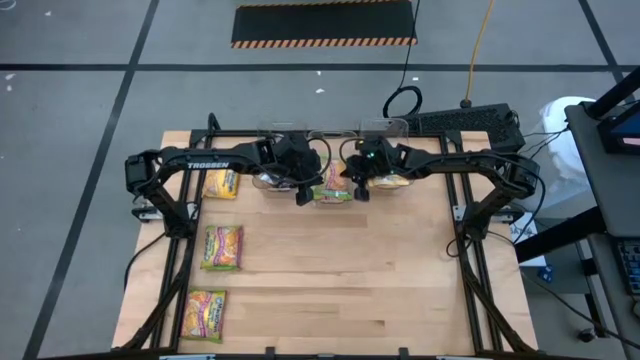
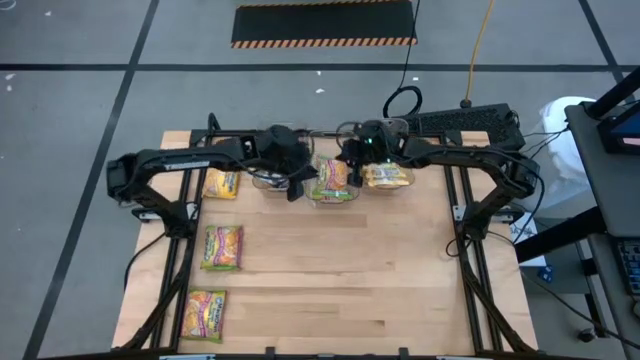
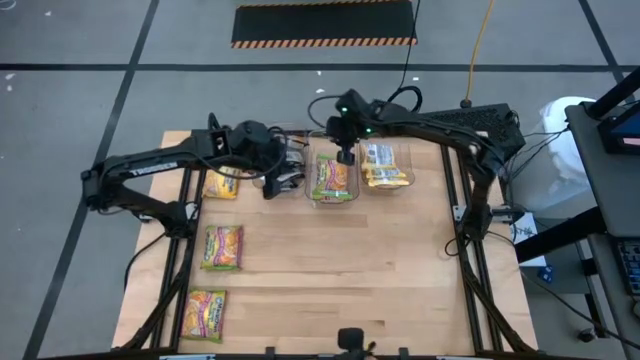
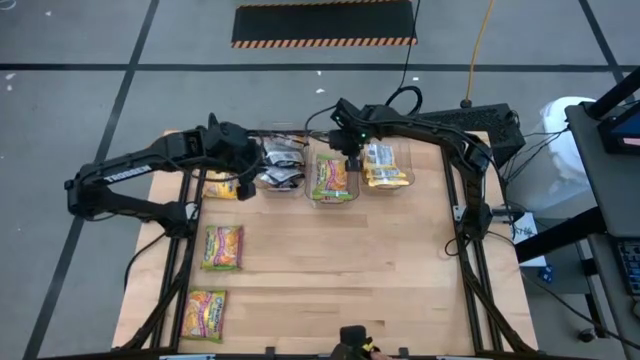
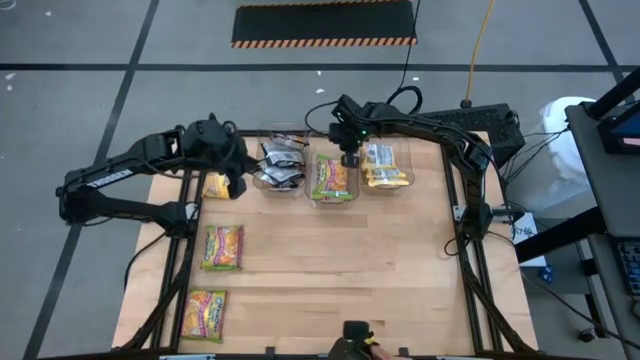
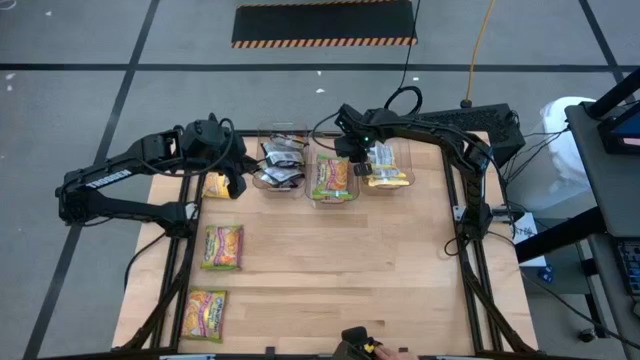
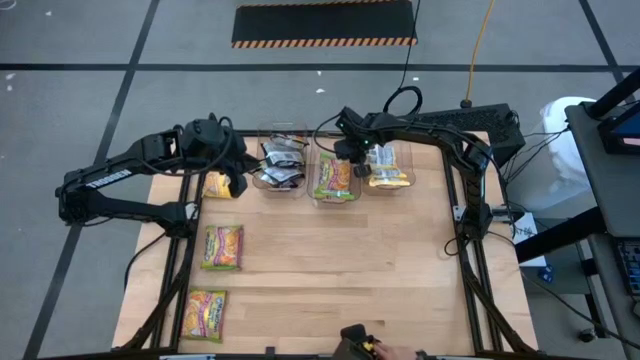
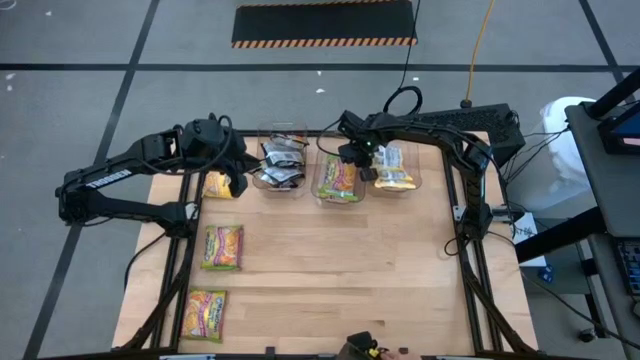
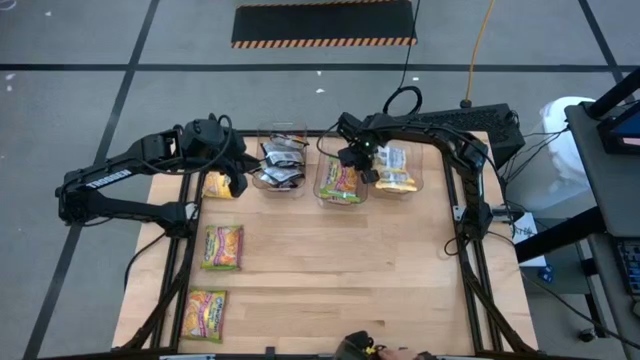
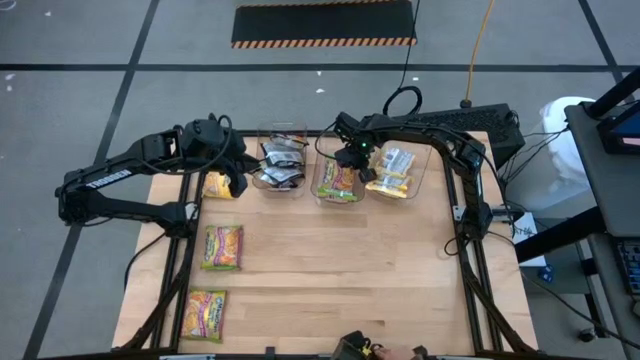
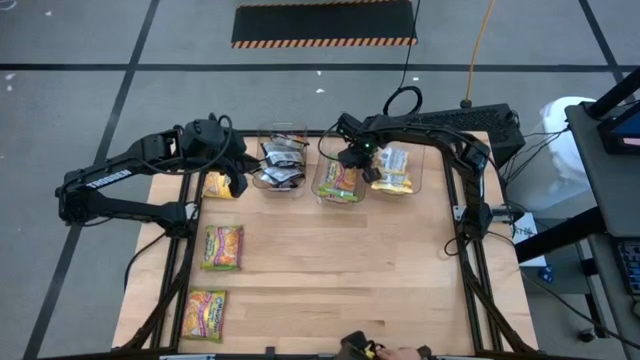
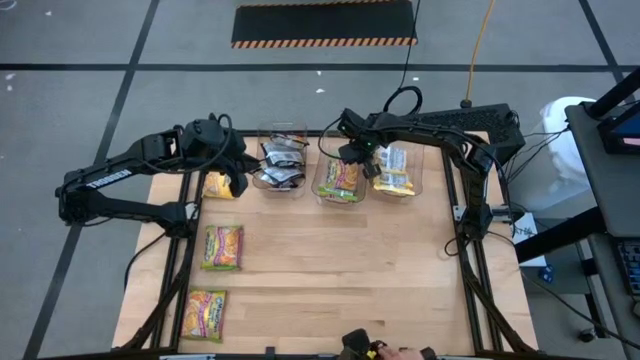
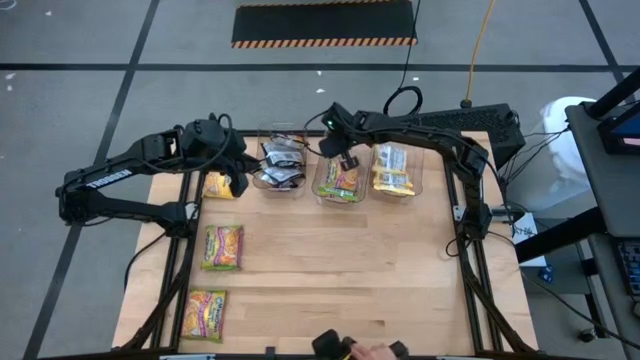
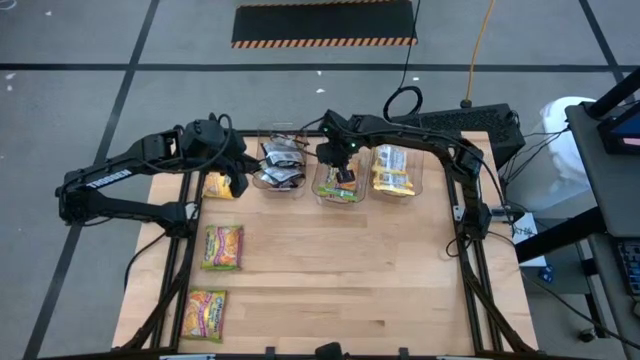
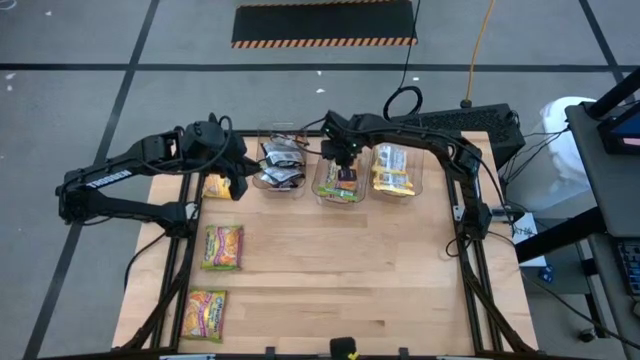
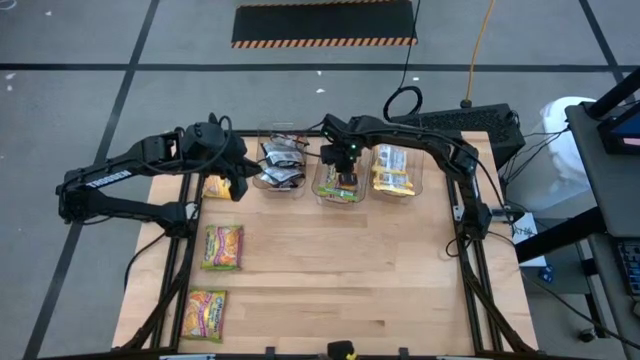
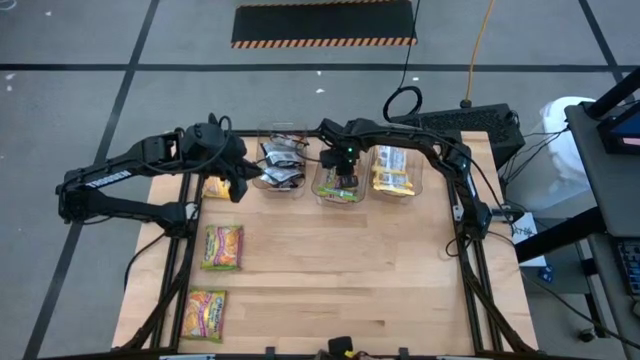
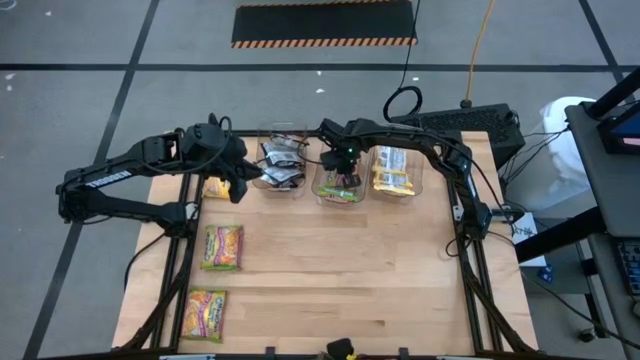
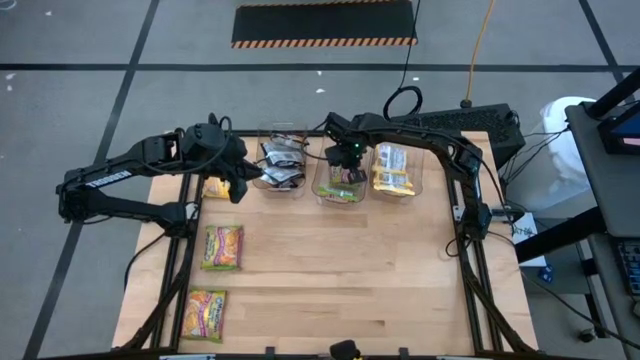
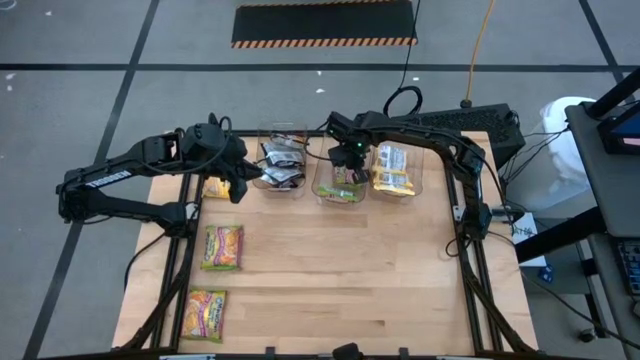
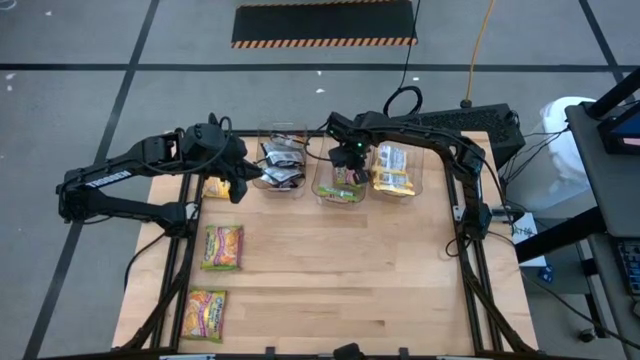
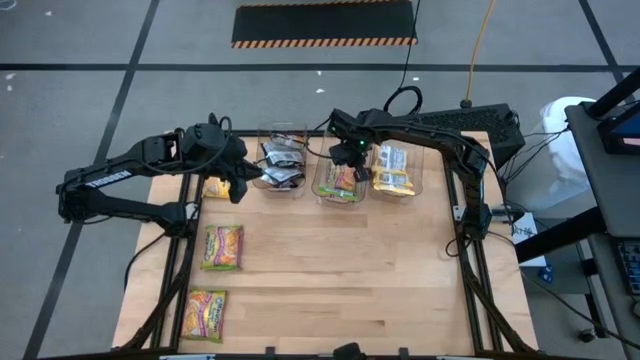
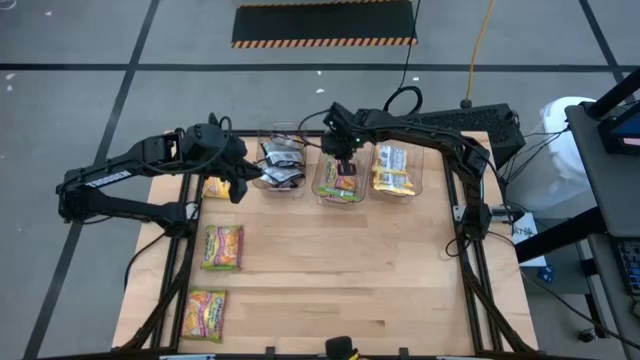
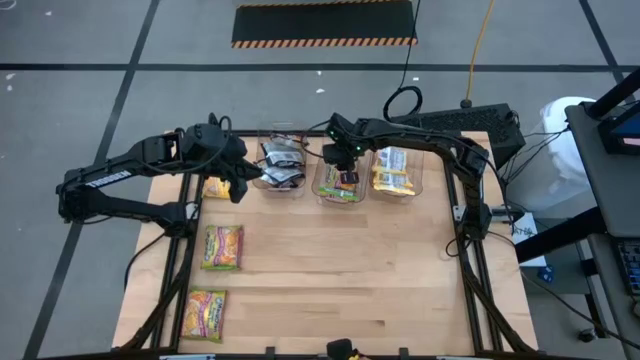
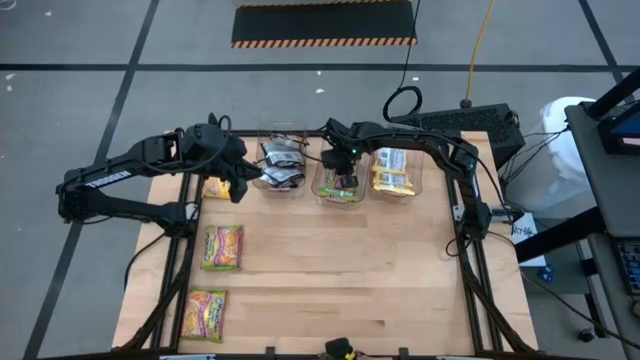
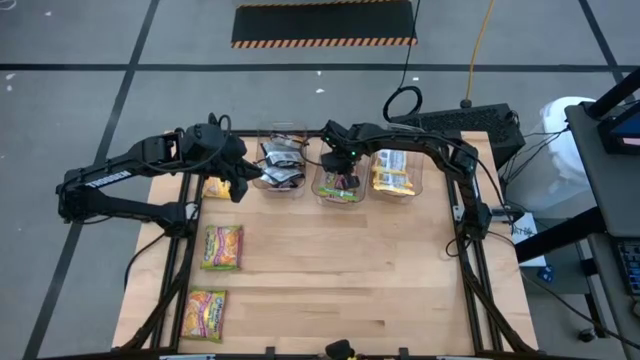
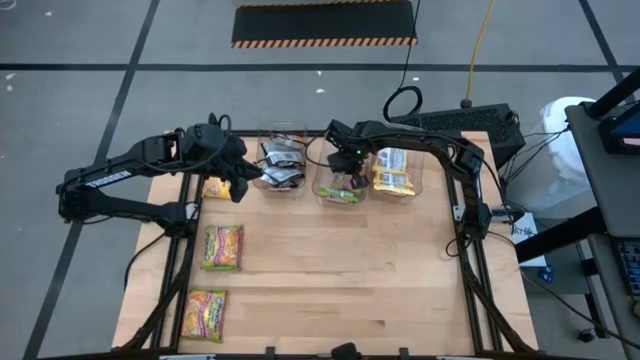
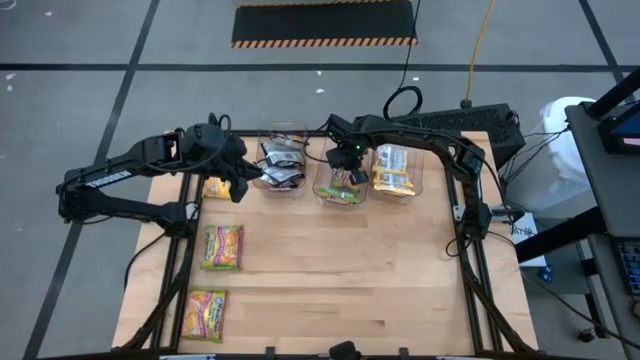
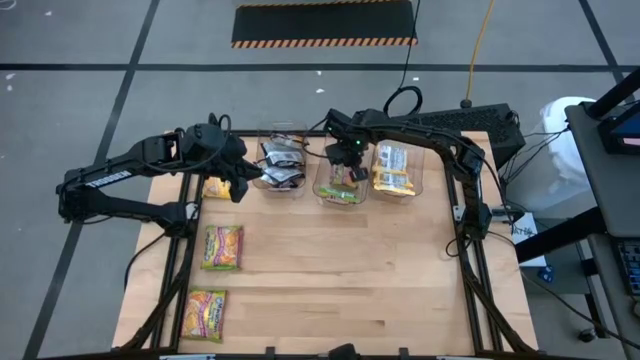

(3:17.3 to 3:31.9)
Task: Sort Maruchan noodles
Adjust the green noodle pack in the middle transparent bin
